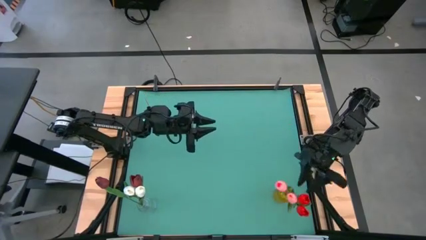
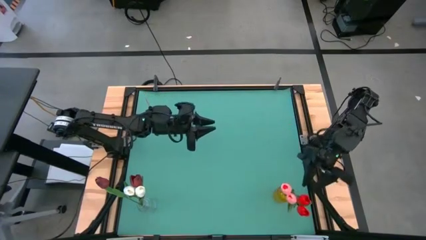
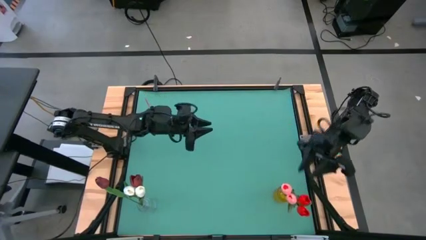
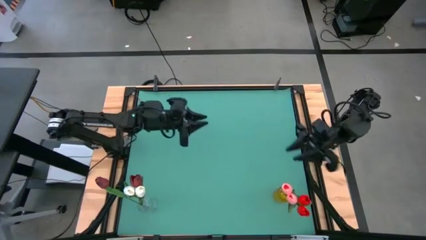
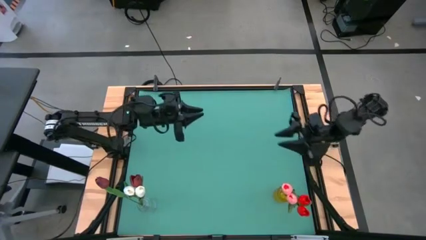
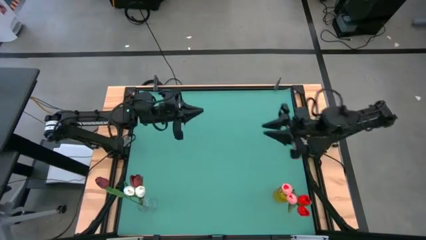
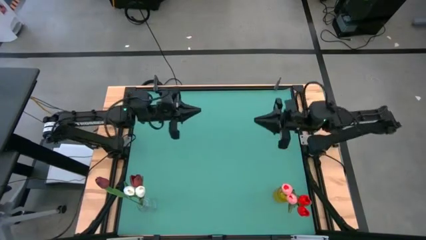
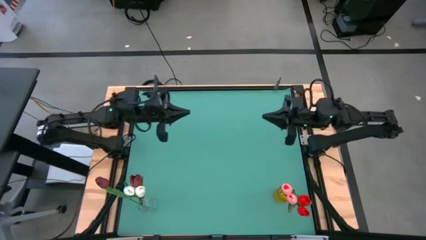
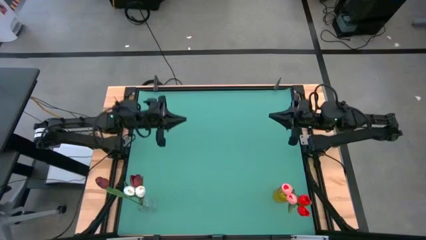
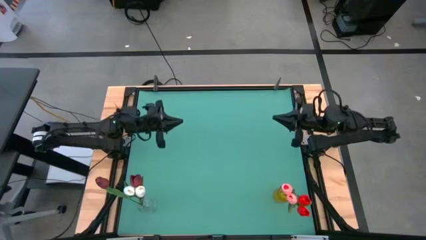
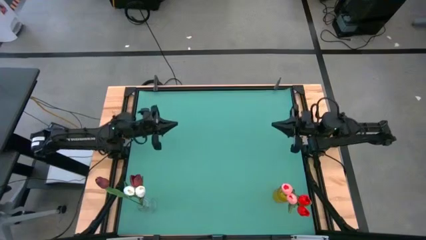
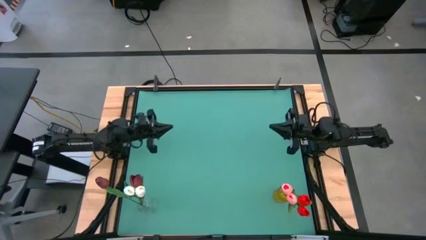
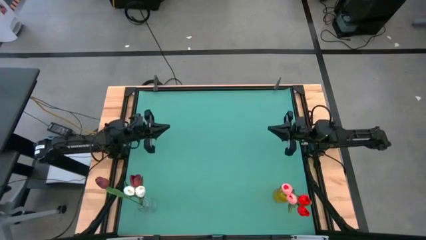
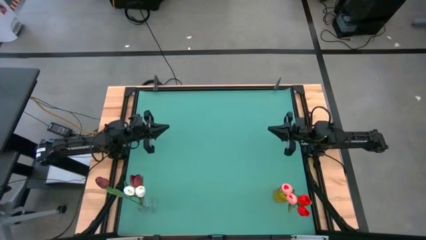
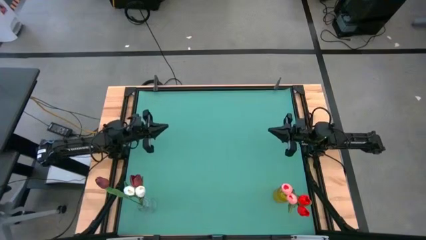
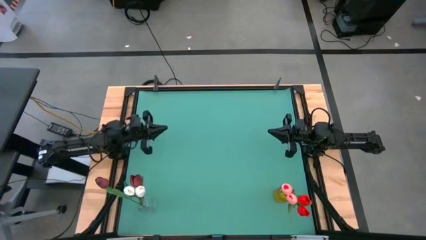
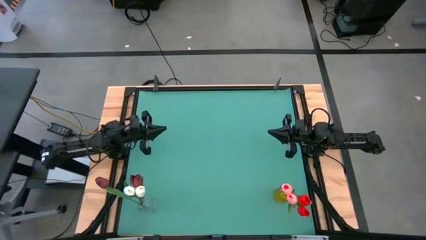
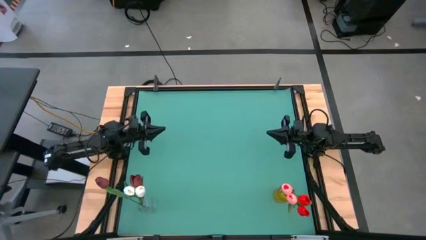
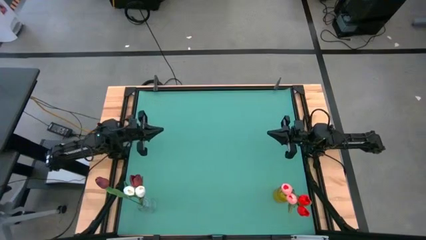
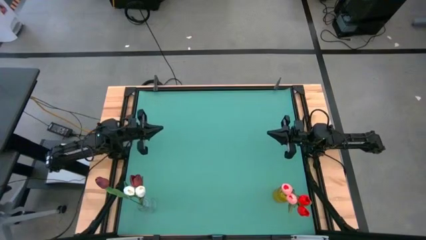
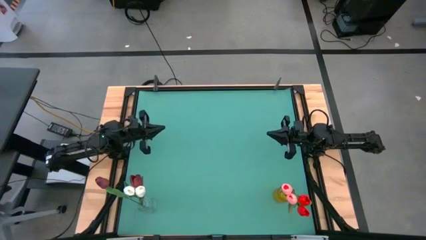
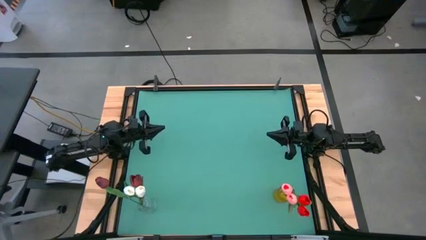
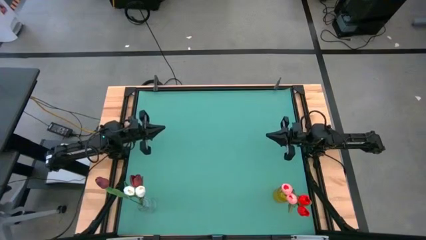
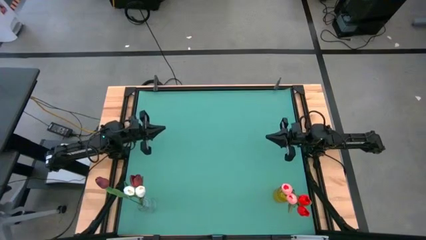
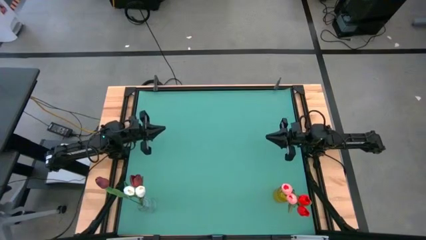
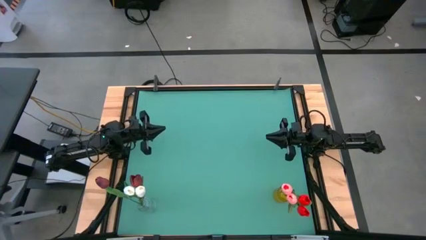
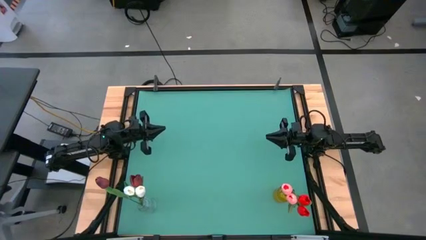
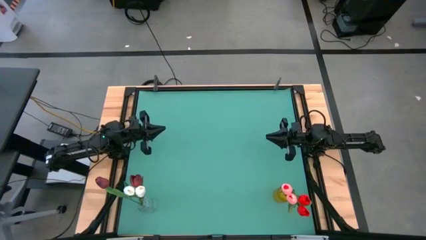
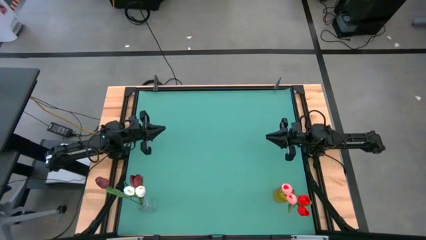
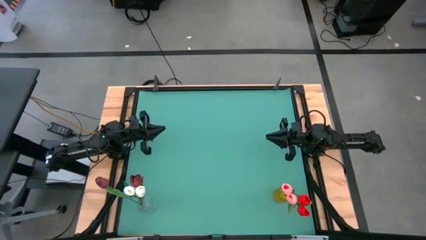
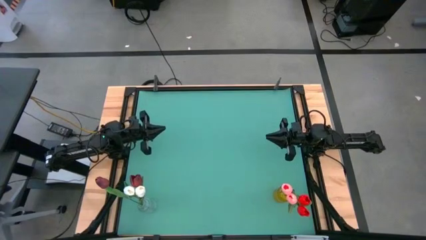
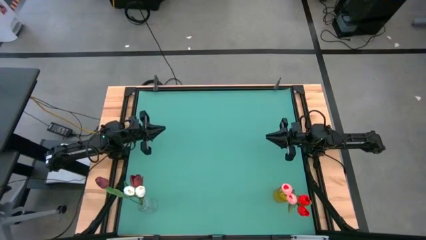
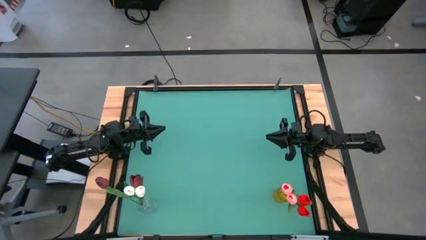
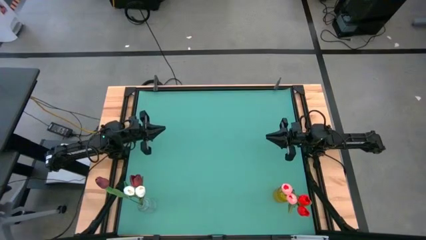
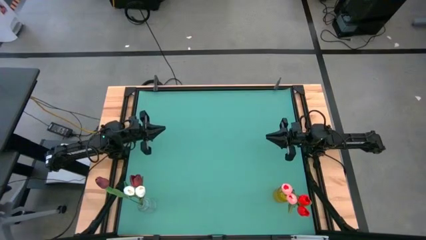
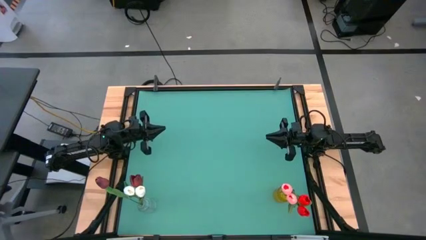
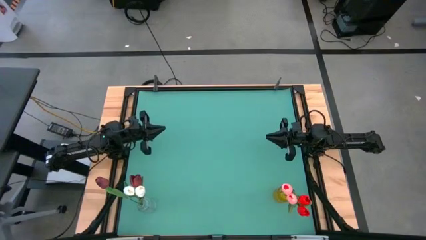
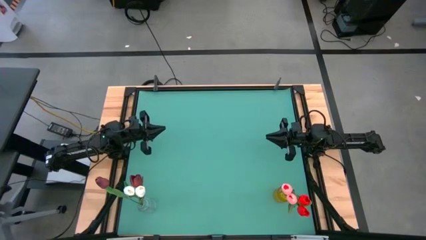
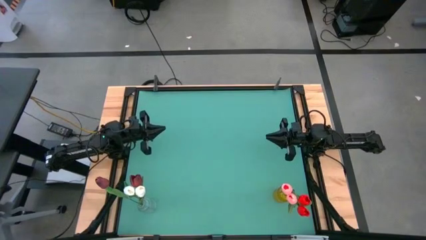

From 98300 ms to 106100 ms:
Task: Sort flowers into vase by color
Return to Home Position

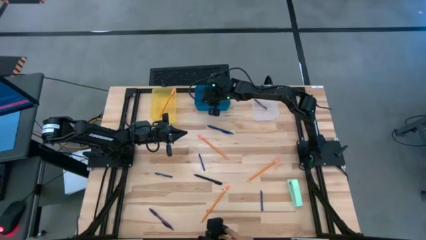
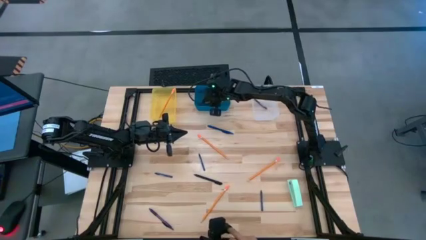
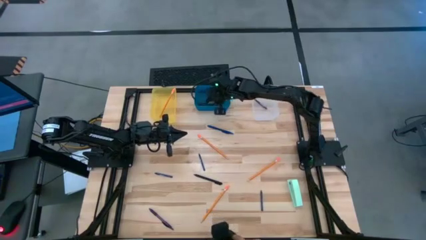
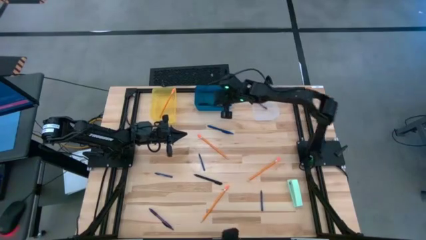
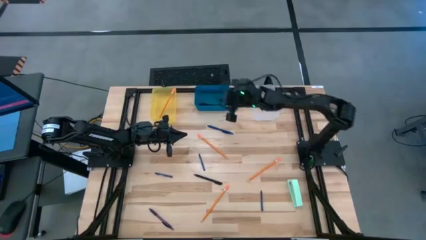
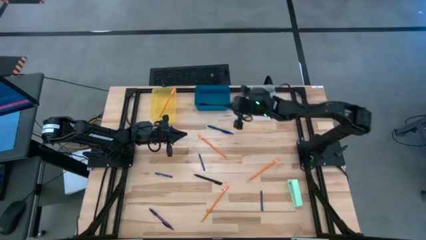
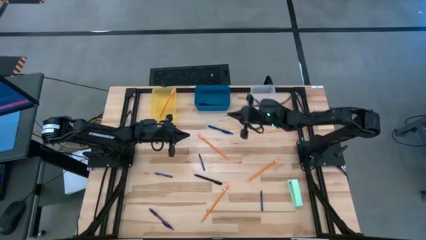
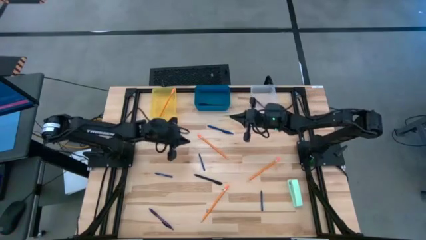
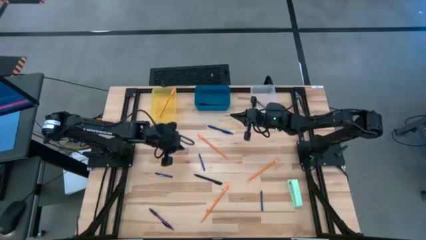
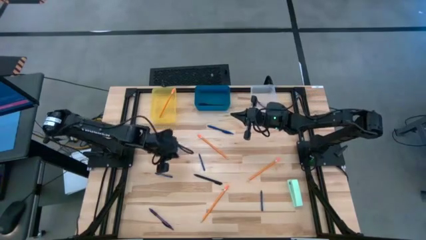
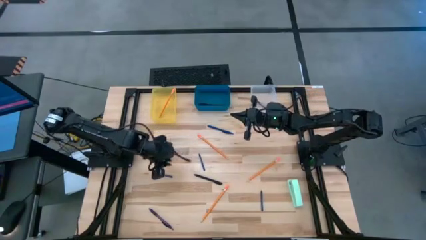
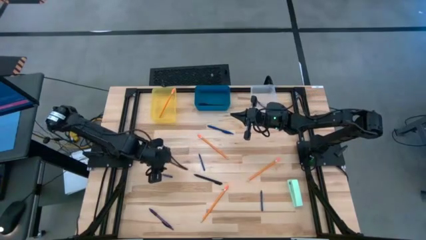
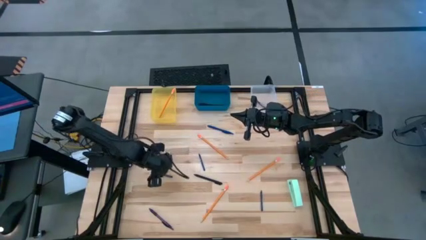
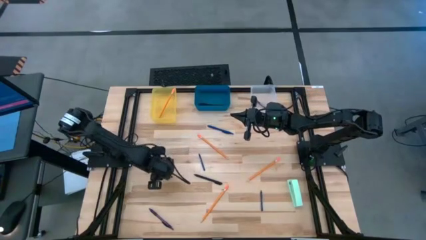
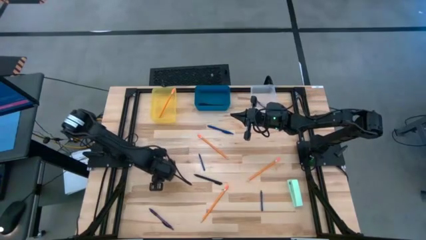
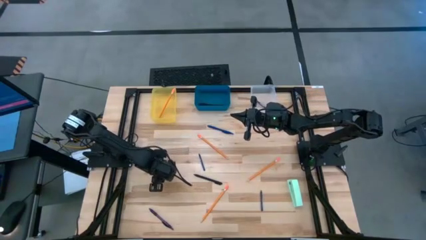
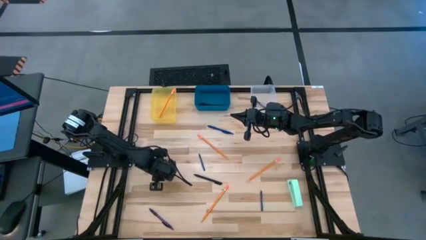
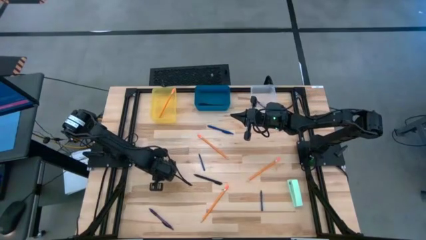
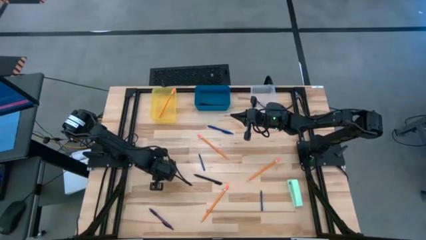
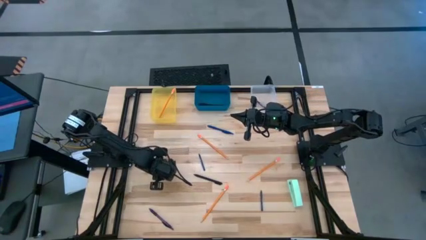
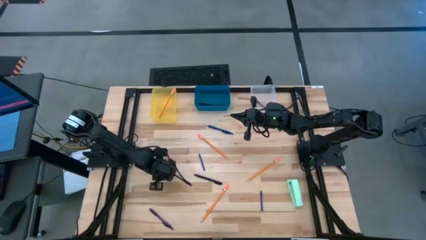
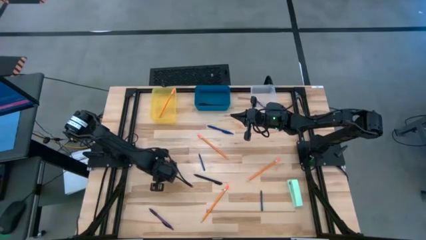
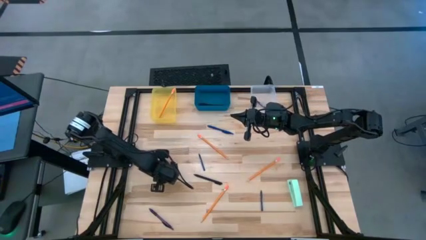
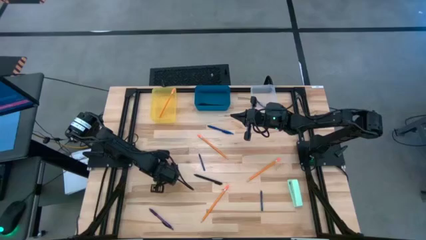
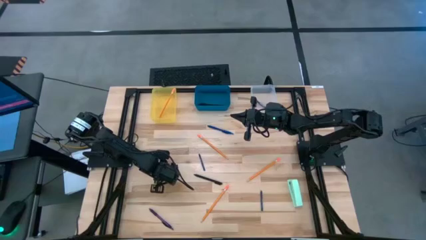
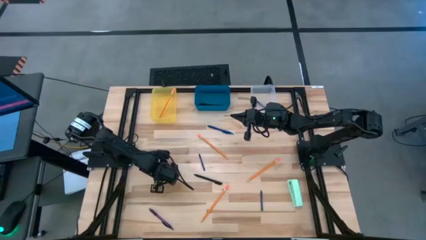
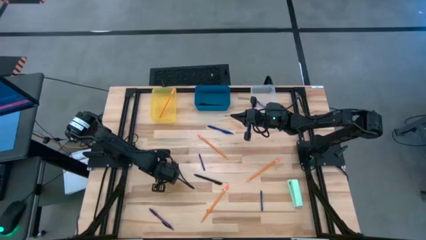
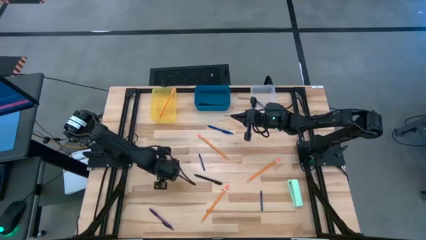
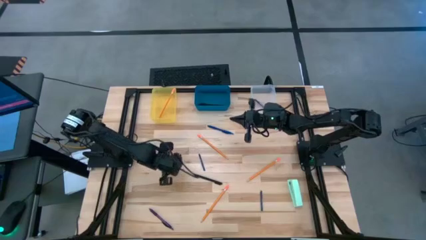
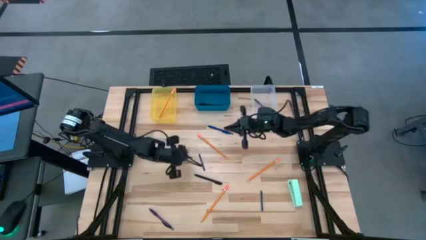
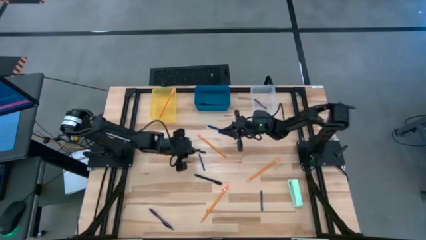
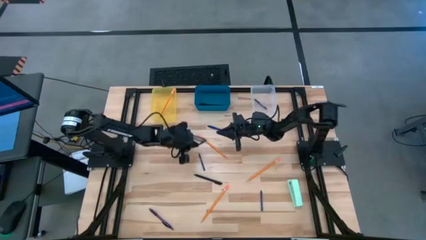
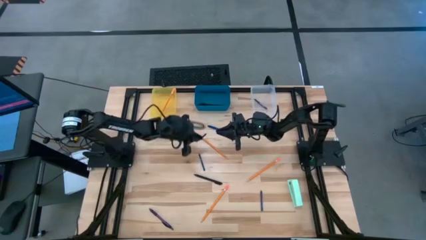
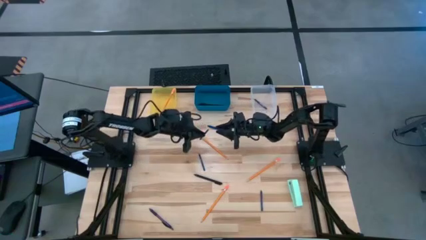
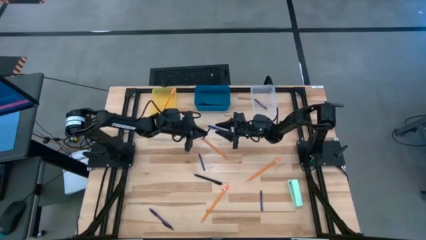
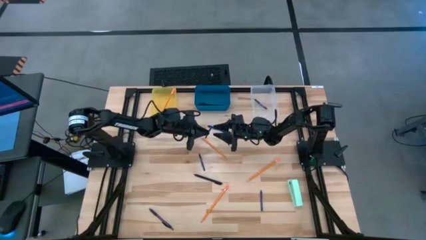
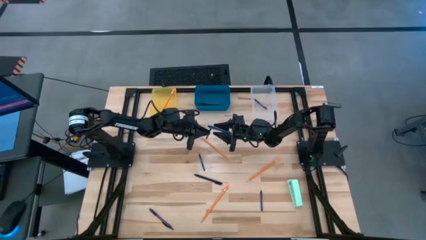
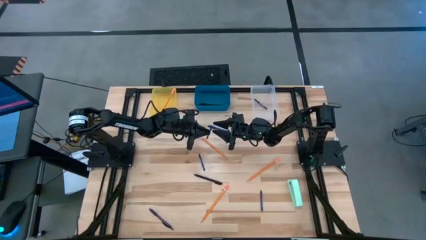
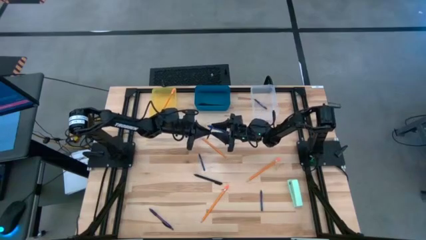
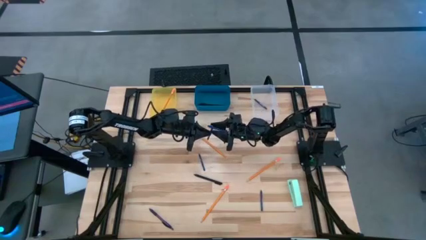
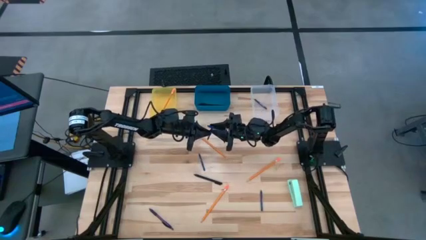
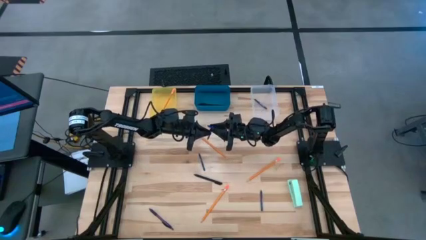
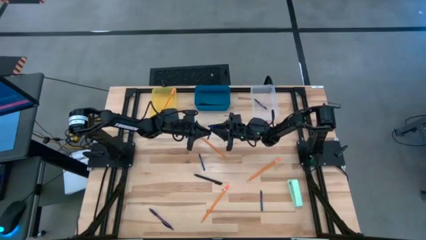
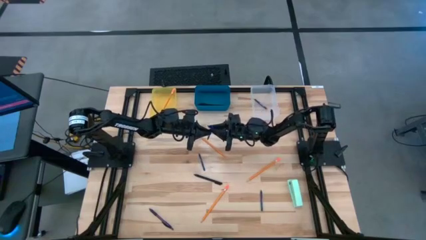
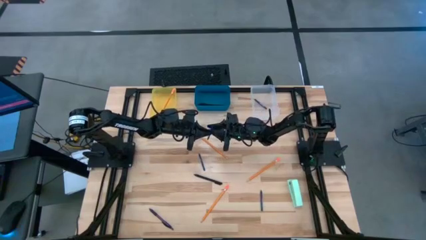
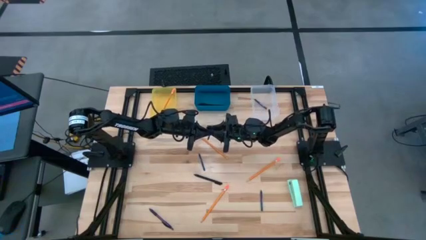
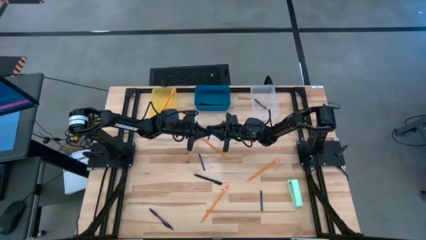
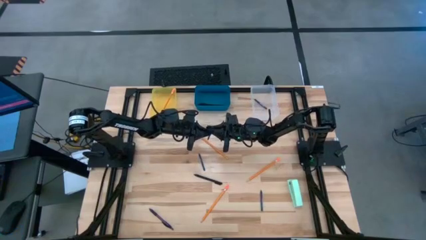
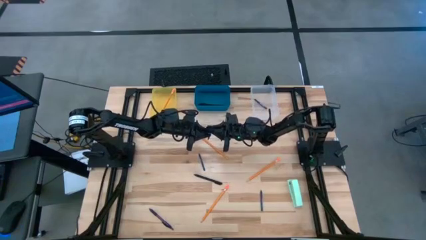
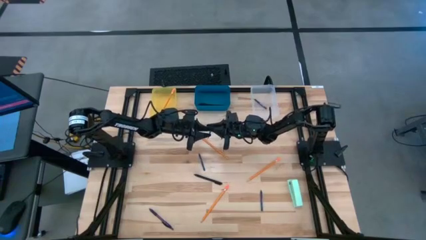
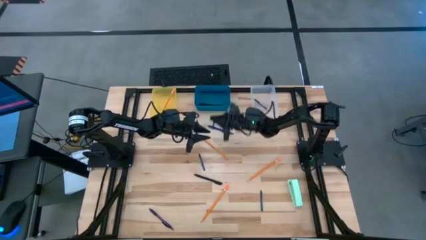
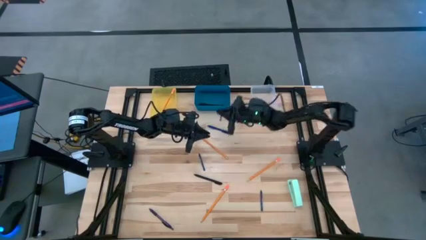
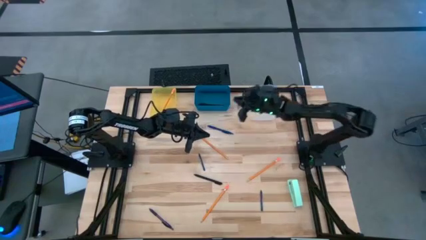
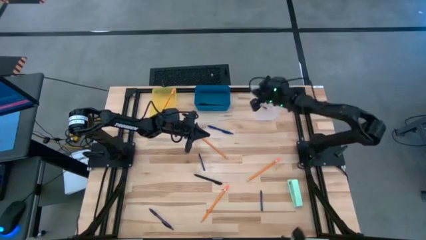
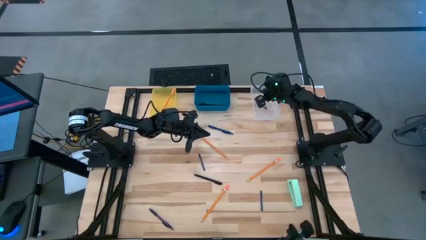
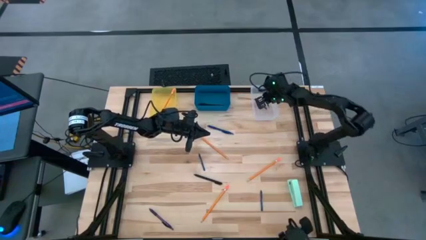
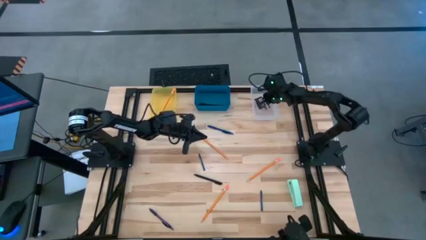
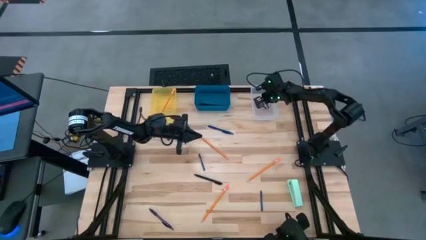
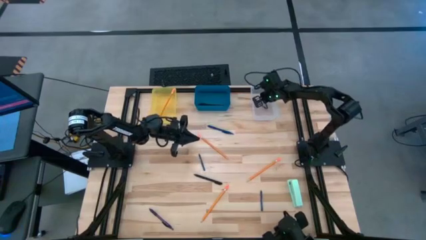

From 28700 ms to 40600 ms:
Task: Sort crayons/erasers/pens/pencils in bins
Put the blue crayon into the transparent white bin
